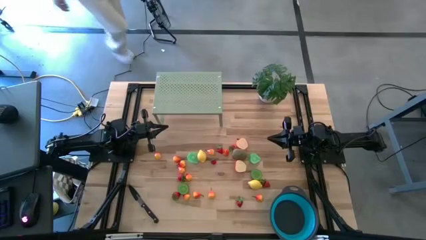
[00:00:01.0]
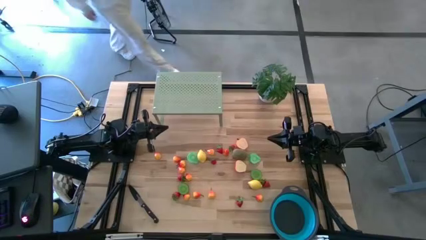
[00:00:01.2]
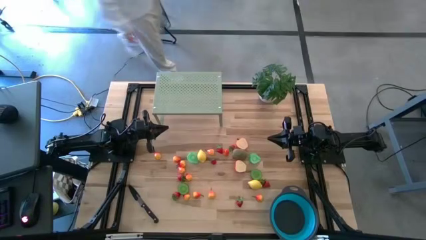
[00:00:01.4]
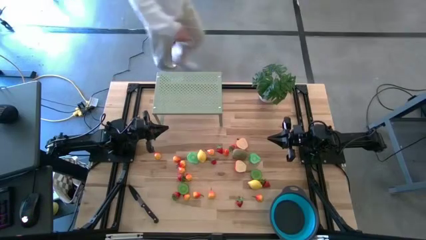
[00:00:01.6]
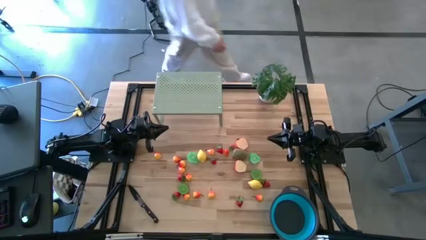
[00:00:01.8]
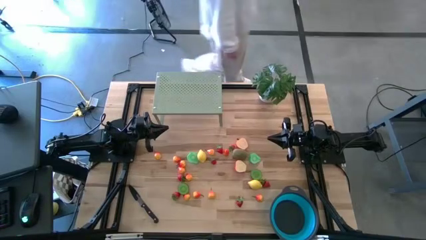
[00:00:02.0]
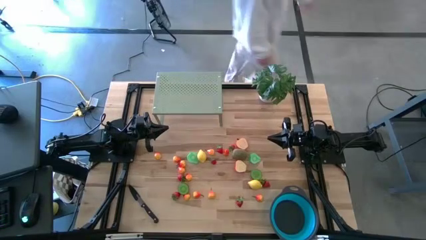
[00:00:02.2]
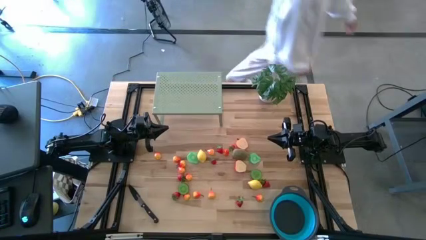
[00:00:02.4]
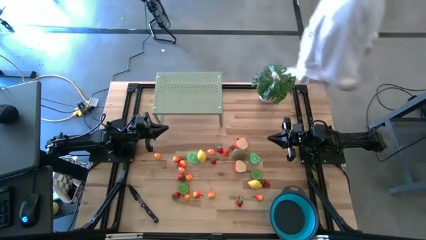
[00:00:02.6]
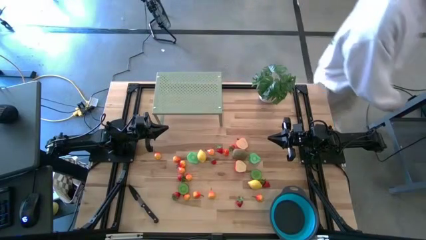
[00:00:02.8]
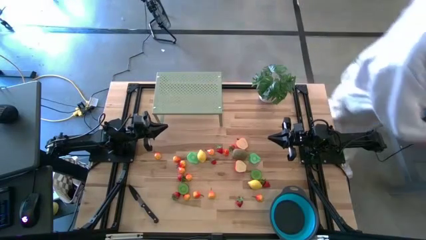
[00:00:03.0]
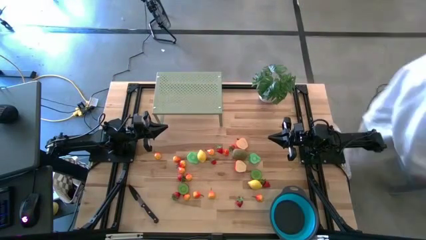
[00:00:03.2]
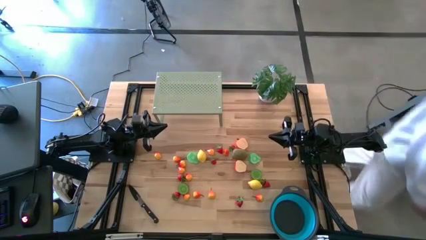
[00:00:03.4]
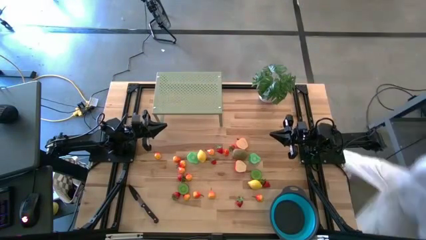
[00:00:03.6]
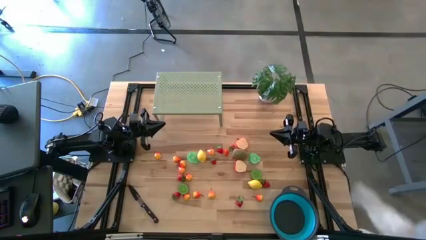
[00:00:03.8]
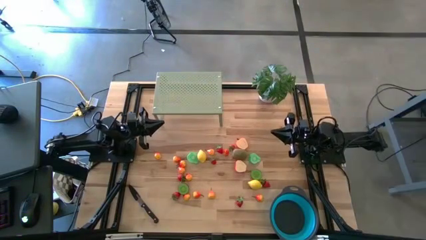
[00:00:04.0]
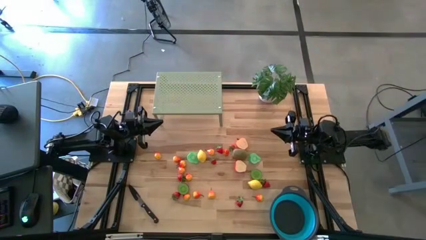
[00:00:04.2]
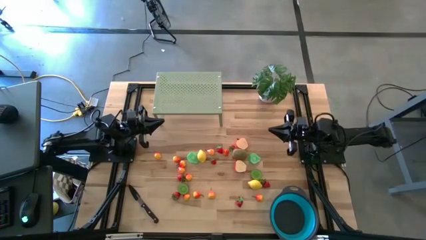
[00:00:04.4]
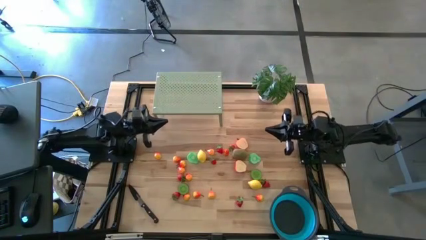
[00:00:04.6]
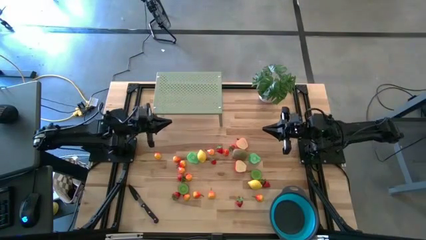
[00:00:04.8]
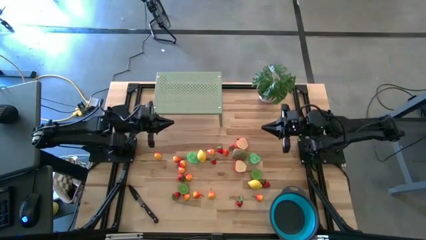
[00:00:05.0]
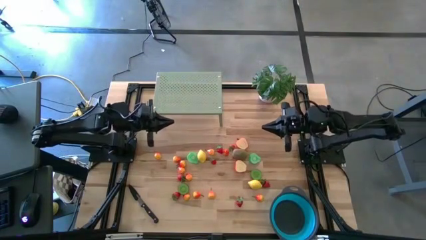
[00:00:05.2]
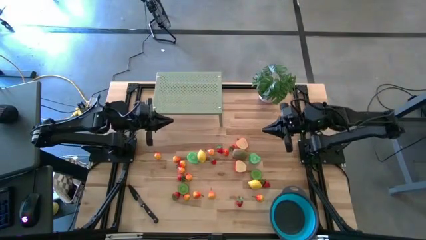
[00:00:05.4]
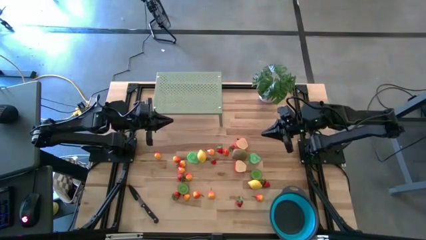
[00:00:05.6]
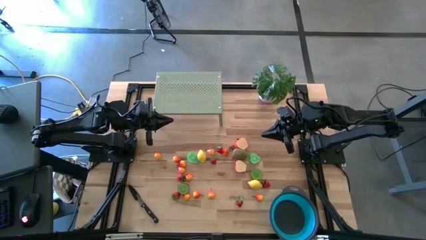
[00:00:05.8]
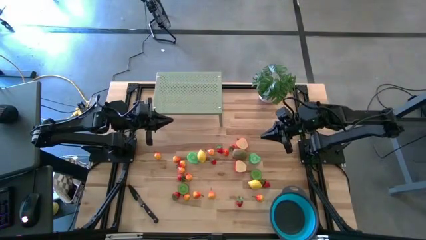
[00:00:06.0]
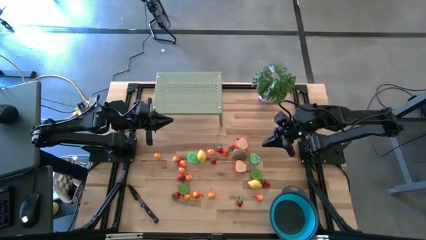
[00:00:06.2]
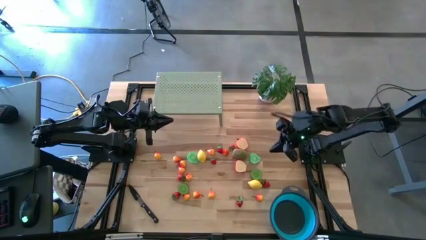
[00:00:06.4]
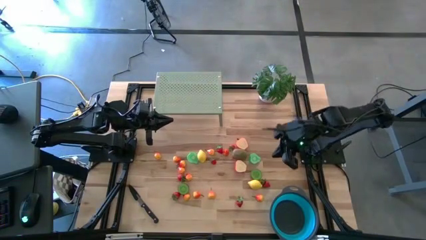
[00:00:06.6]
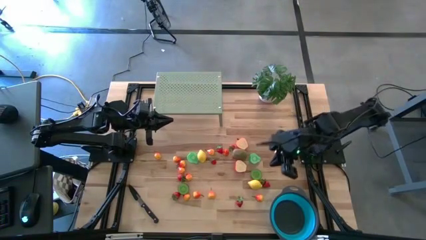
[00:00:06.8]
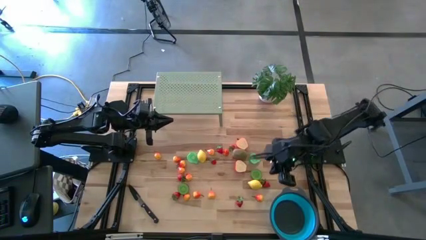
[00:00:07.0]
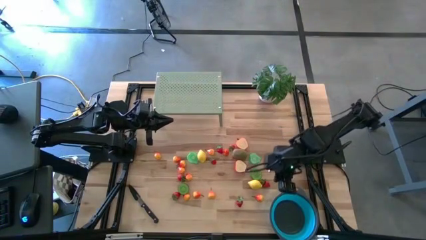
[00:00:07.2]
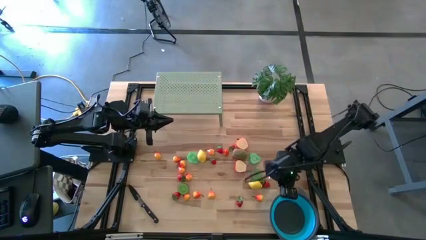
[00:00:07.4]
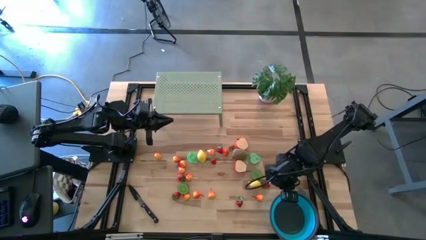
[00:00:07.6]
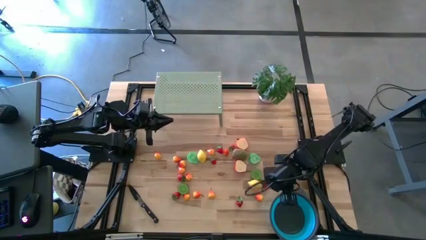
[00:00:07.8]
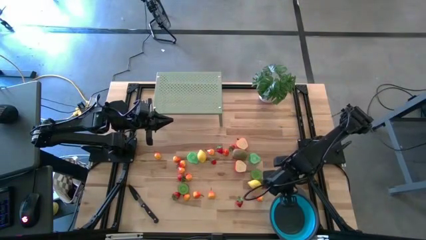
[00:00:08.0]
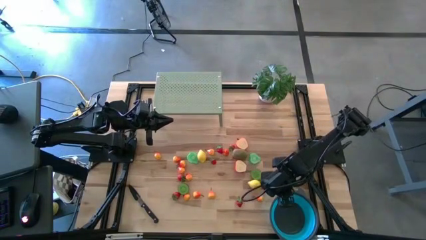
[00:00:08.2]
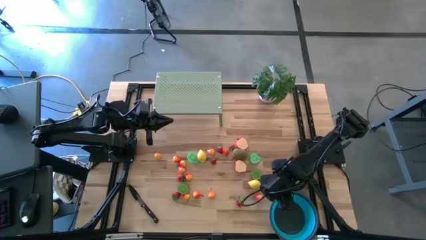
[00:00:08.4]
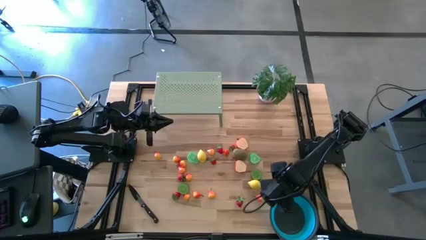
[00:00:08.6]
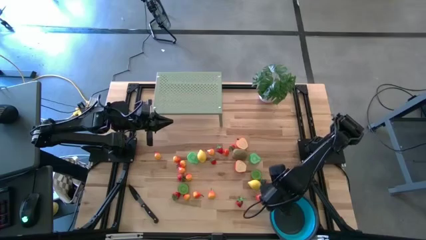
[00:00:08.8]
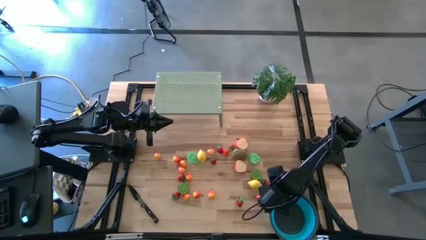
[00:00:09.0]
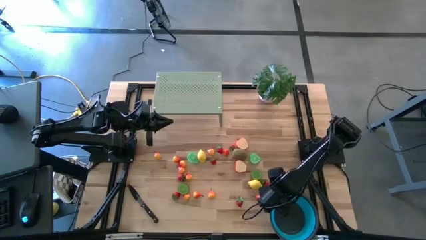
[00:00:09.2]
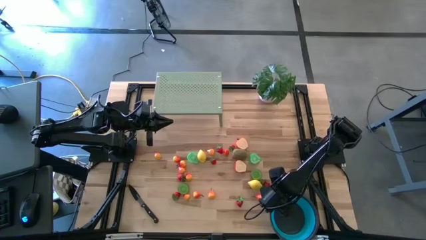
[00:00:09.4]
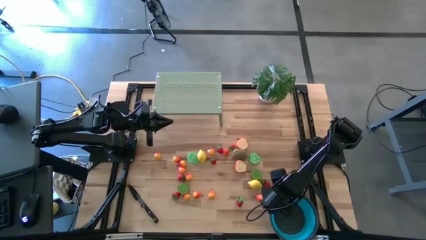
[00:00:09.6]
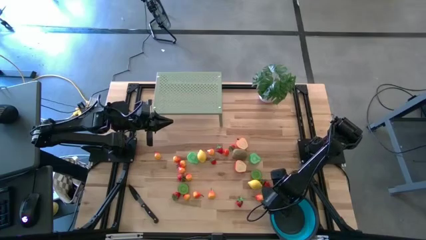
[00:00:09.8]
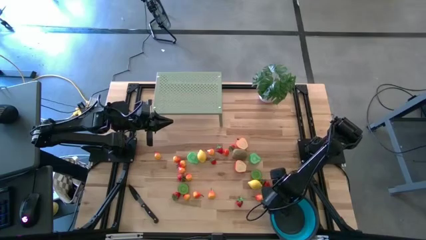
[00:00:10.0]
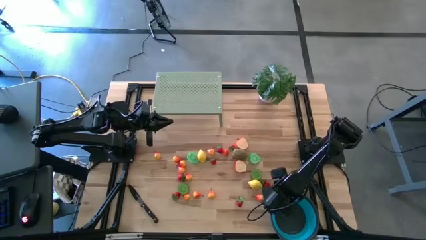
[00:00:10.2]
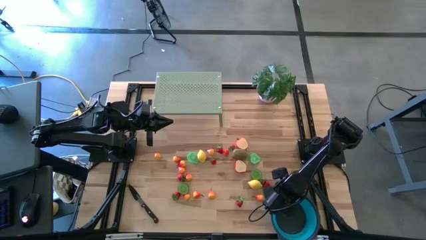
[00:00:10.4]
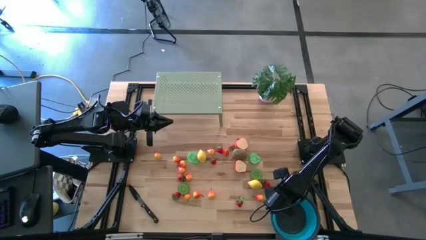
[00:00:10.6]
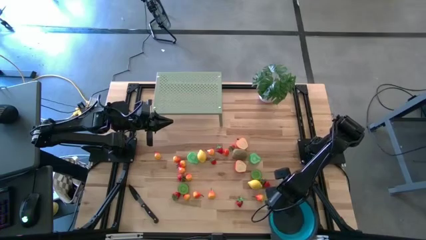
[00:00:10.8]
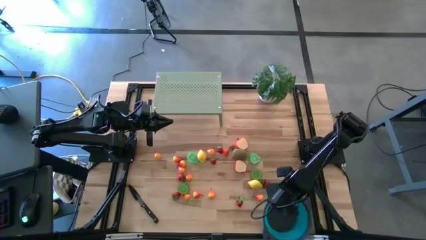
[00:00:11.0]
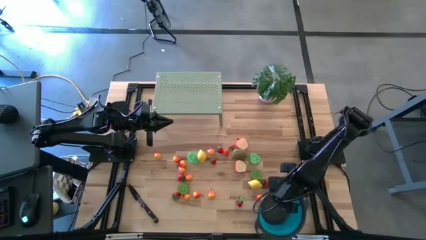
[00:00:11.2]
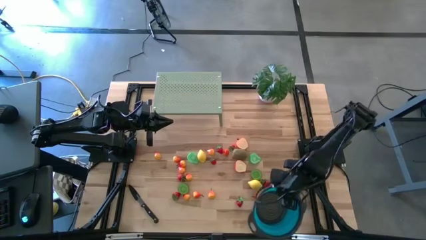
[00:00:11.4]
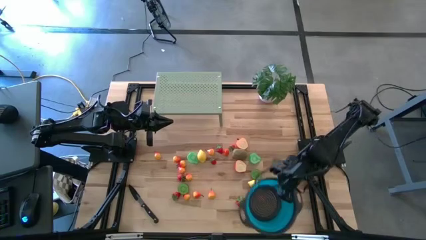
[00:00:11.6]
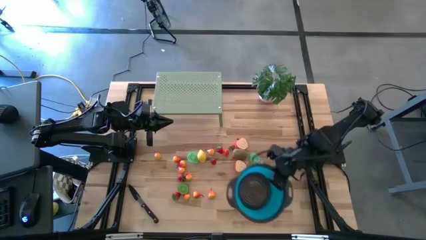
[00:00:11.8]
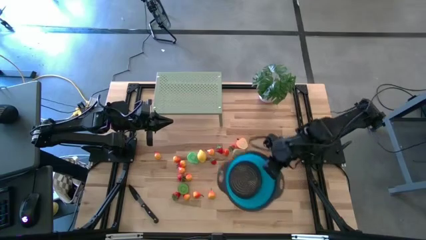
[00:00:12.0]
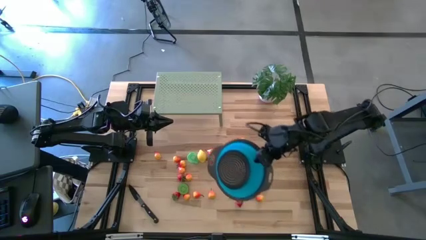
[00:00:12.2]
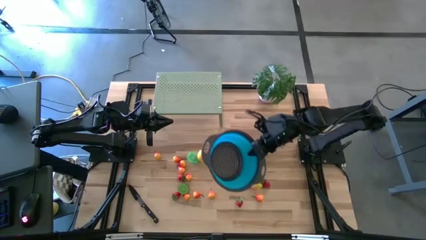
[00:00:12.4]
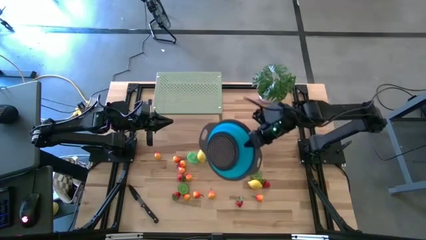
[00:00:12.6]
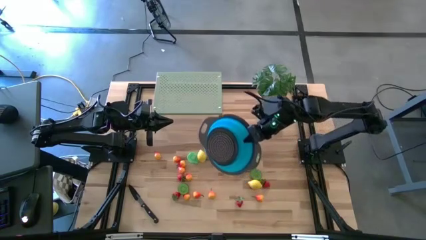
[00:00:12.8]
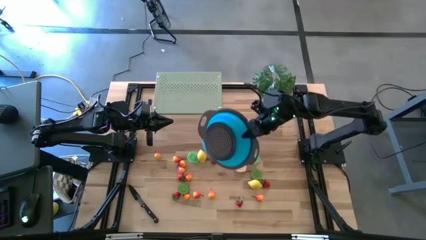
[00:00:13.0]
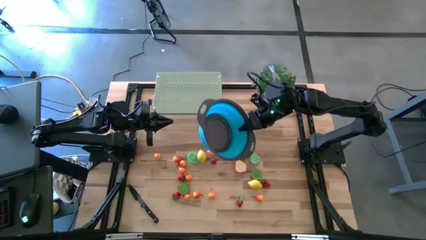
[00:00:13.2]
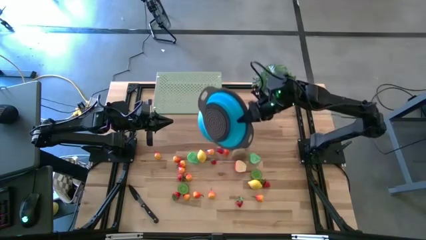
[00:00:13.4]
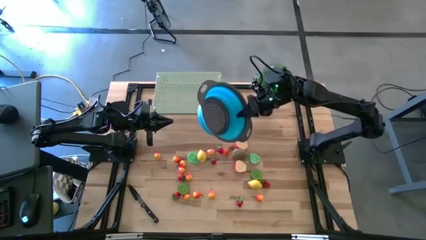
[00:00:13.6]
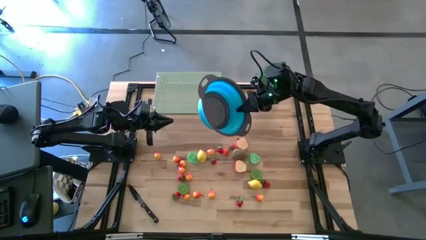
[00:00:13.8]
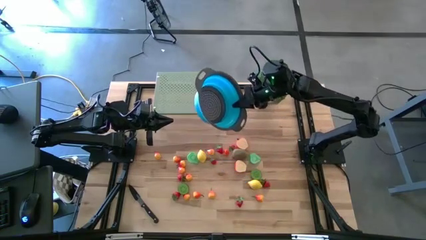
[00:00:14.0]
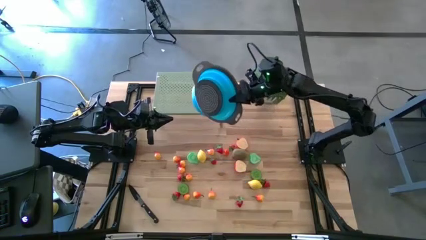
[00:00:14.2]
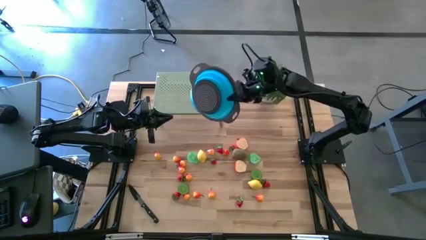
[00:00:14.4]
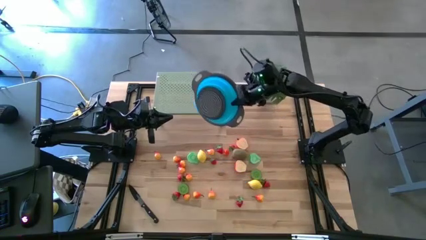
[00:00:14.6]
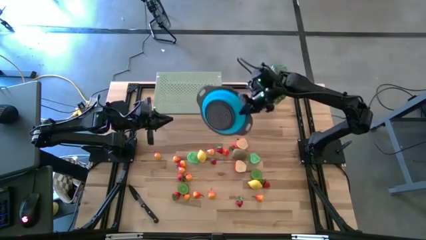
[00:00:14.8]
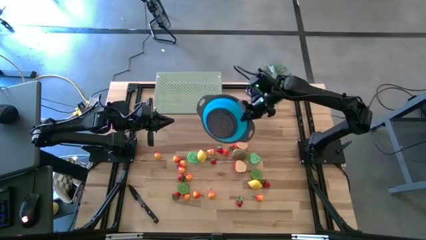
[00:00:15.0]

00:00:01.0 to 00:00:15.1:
Task: Pick & Place Fruit
Put the strainer bowl on the shelf
